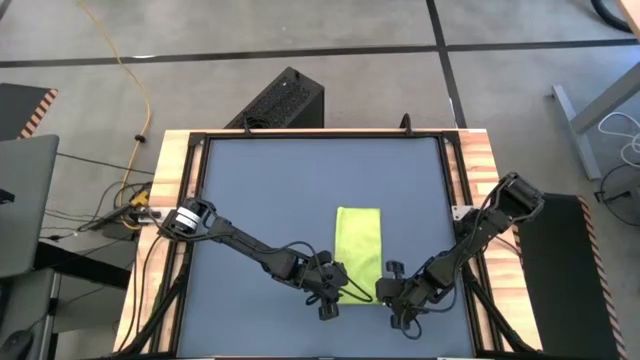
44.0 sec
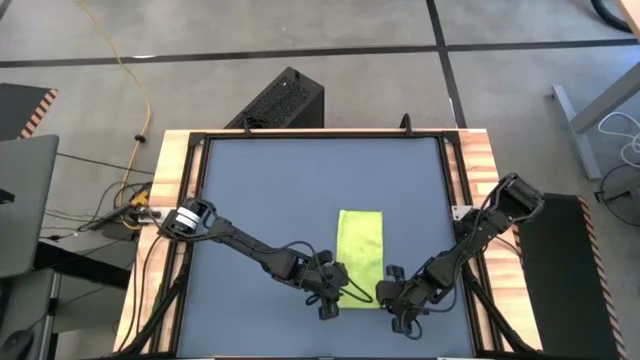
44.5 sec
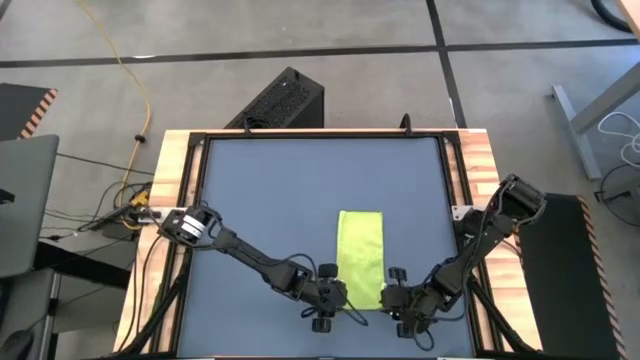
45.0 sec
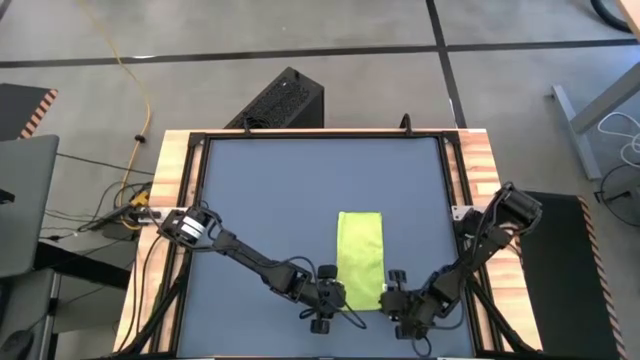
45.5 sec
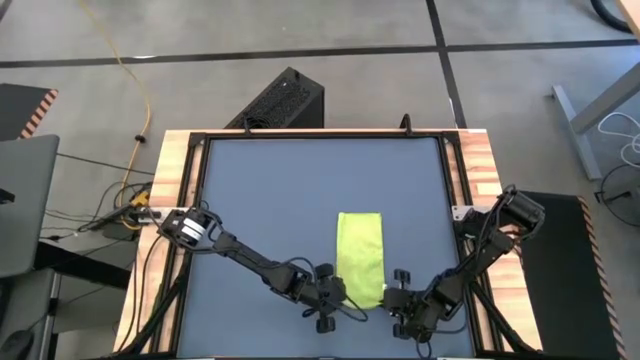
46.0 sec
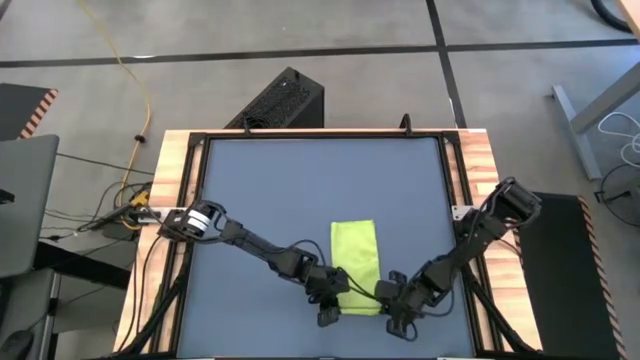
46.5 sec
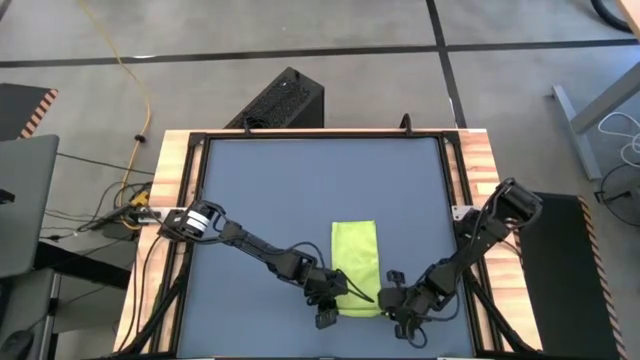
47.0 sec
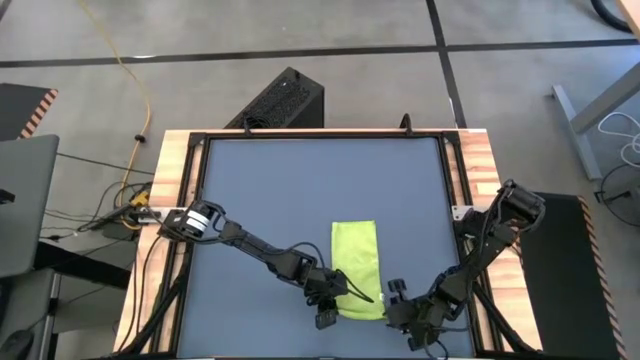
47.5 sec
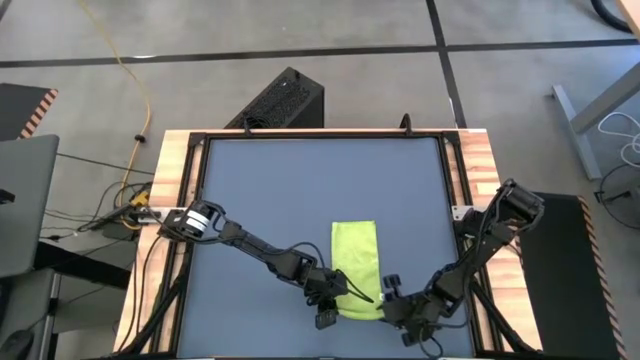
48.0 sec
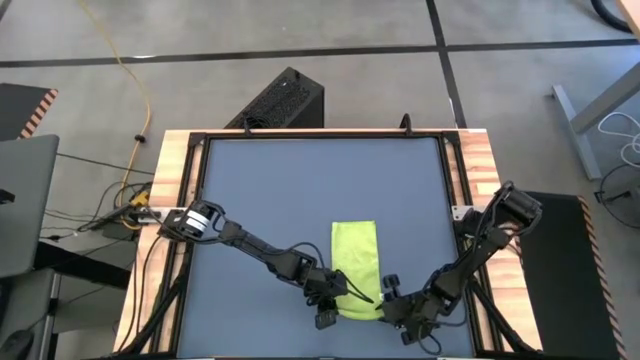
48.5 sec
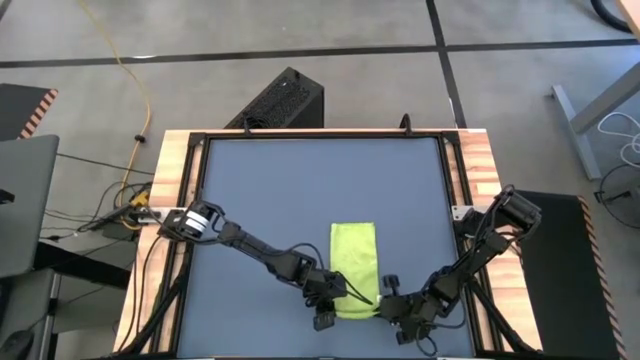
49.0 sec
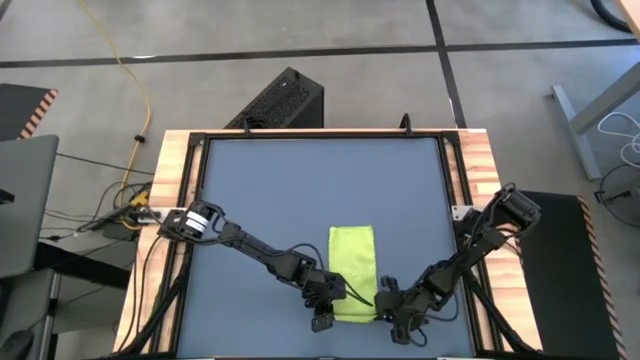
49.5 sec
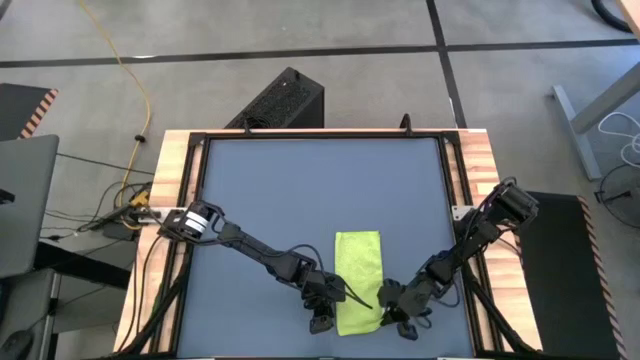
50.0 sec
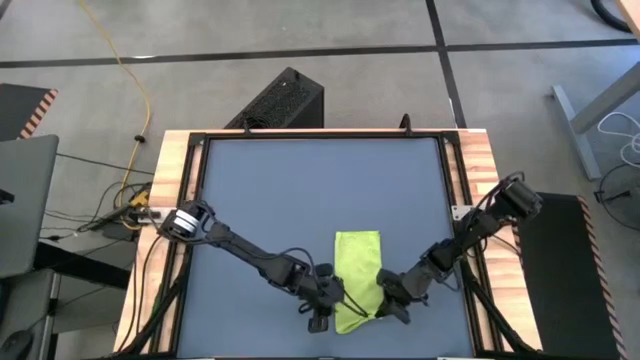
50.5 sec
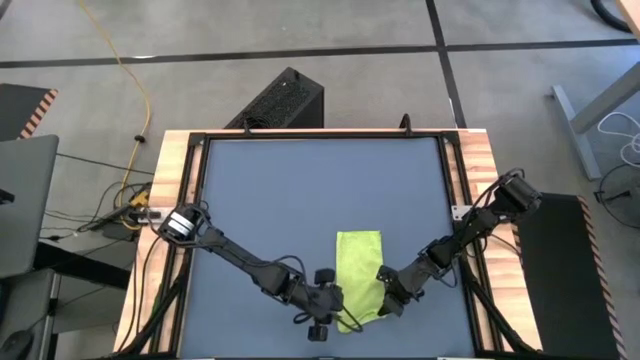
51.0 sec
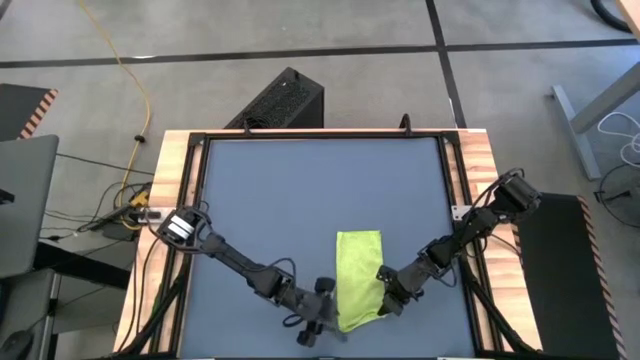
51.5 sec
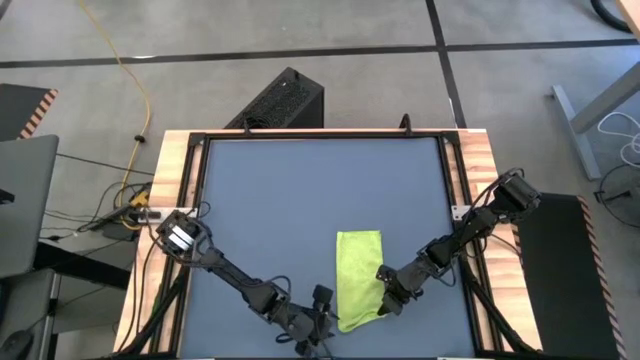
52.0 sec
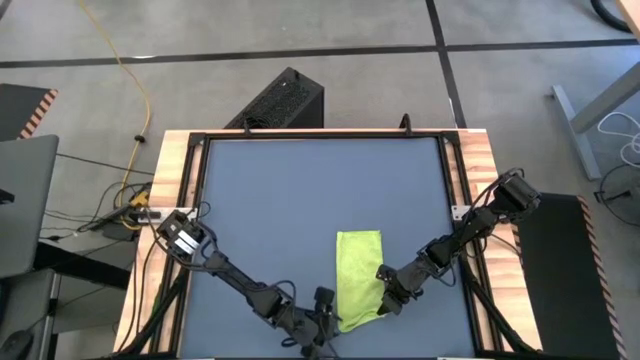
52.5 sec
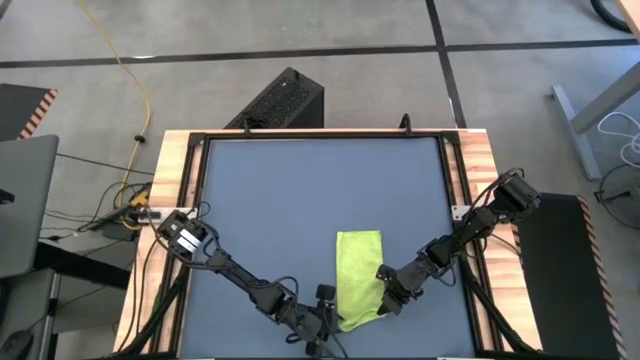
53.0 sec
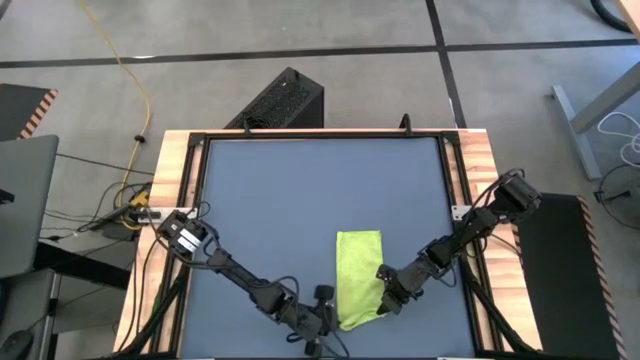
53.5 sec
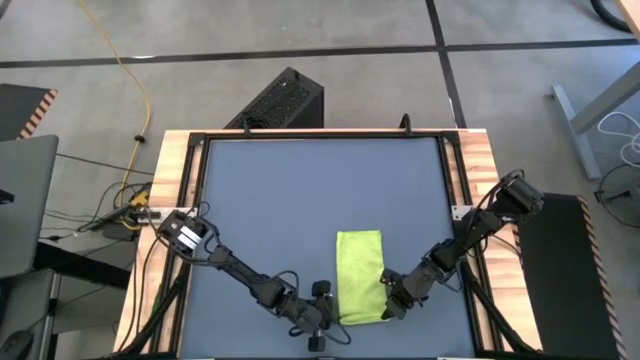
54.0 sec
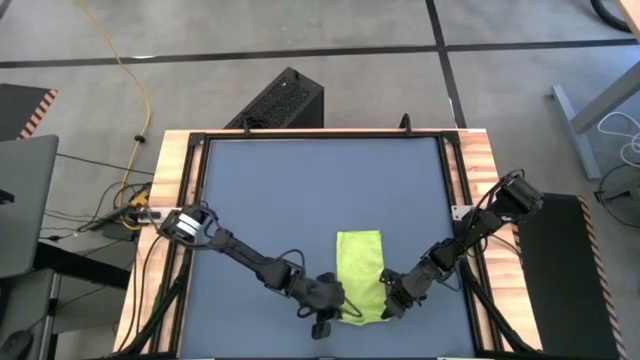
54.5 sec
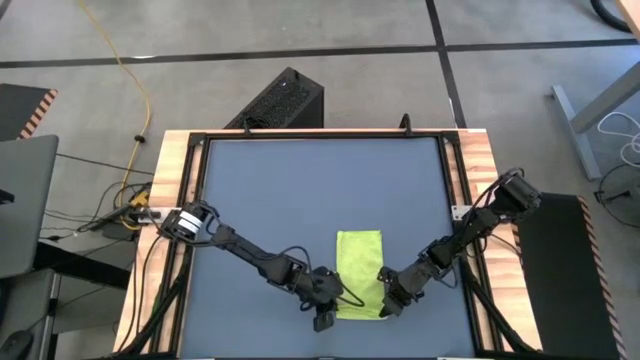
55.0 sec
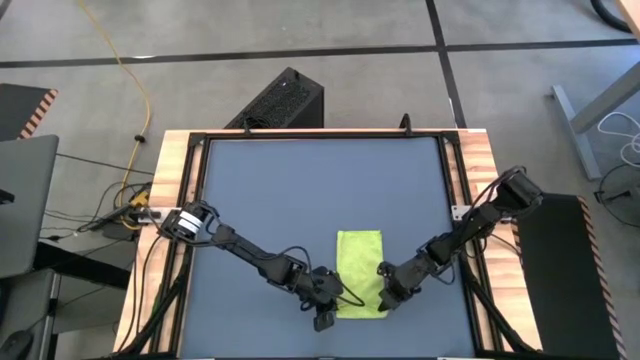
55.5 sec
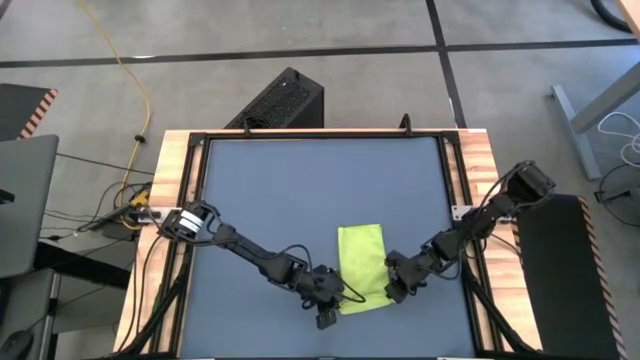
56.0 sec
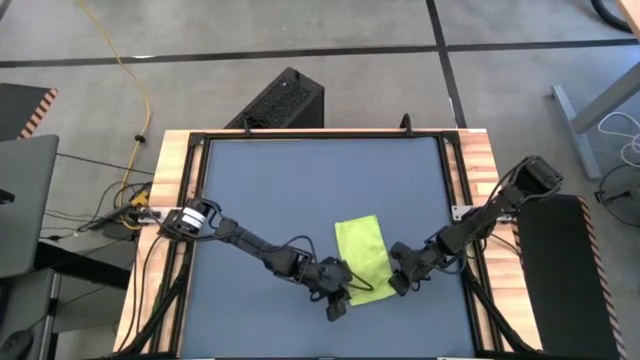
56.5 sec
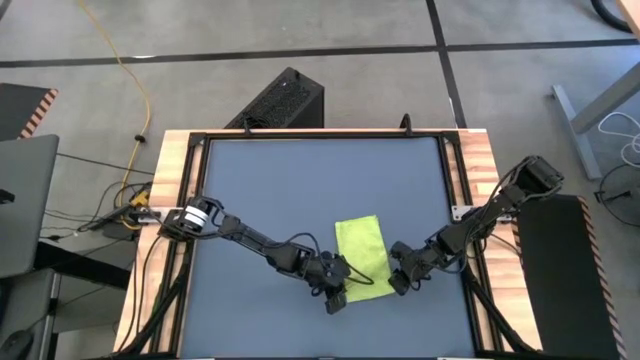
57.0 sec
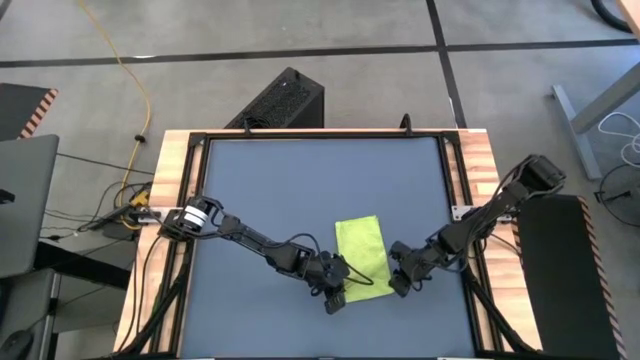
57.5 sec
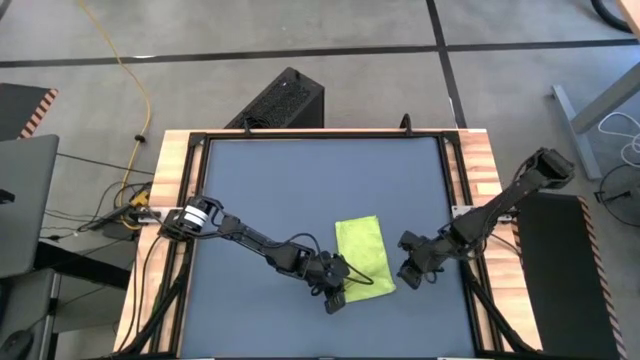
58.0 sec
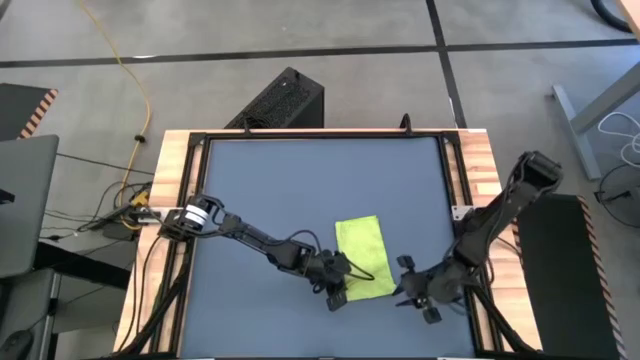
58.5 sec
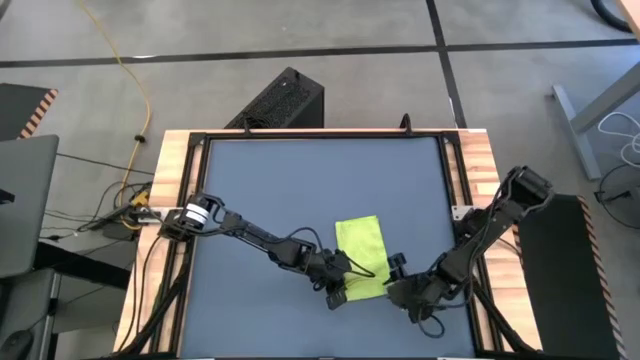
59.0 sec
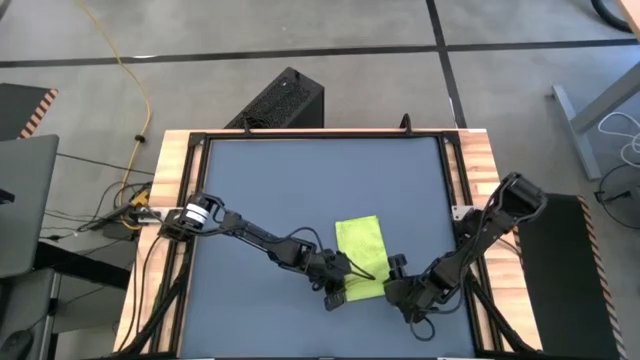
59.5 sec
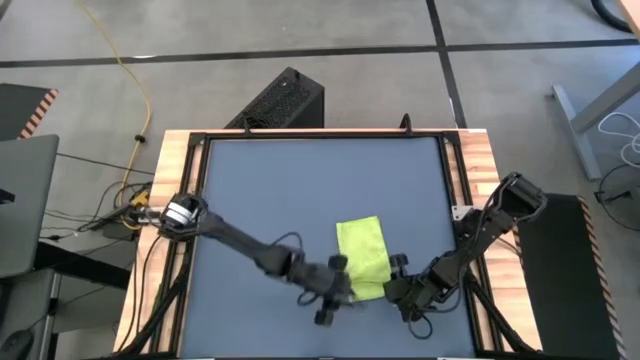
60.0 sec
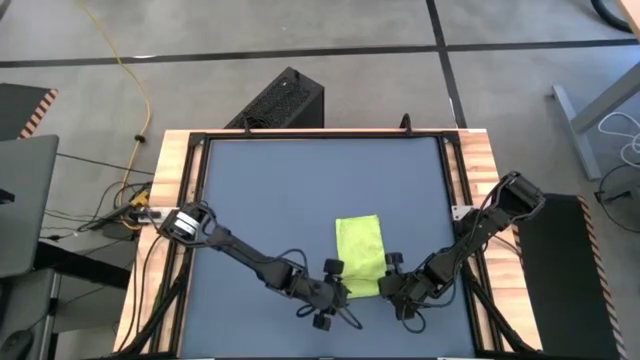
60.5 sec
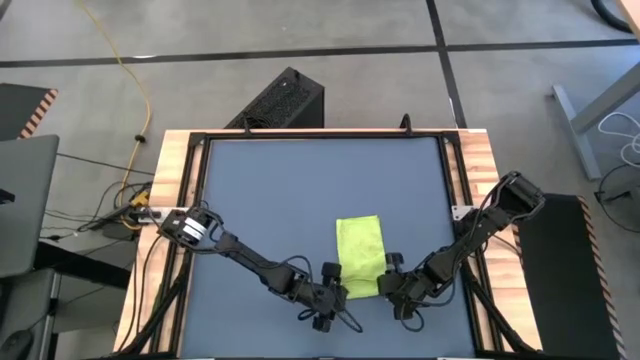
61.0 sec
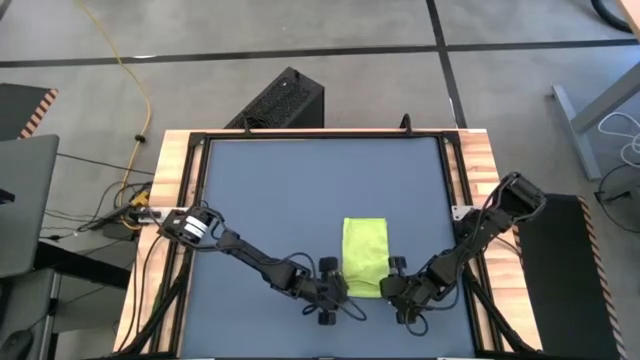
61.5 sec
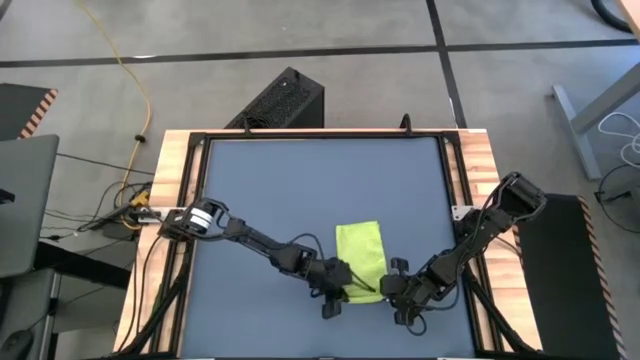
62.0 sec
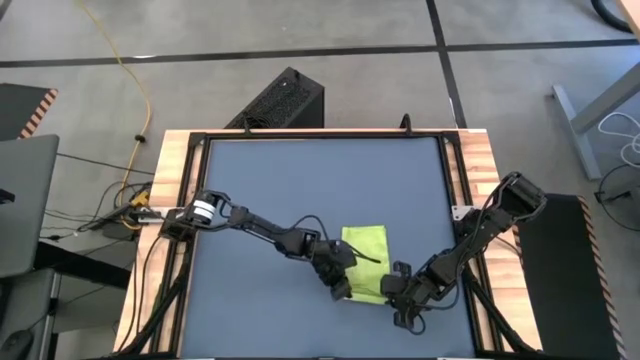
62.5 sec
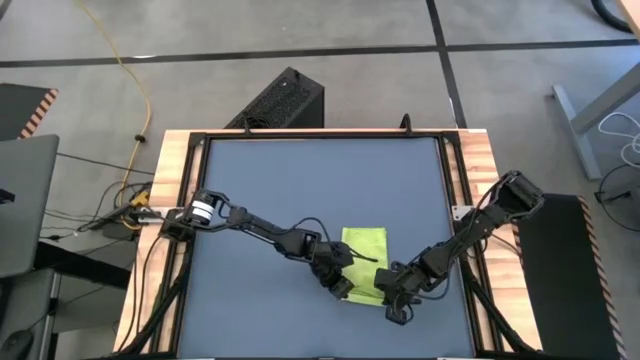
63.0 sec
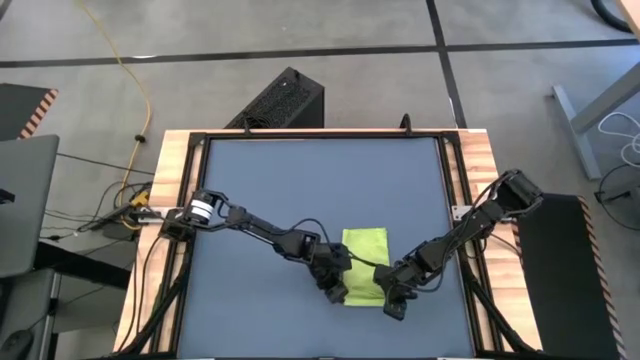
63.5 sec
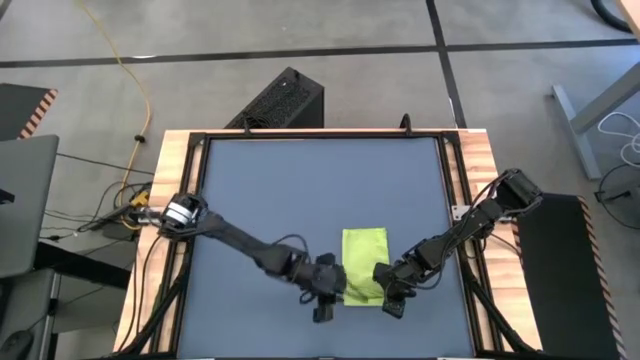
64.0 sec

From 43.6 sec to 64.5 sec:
Task: Roll towel into tight, uniform cylinder
Roll the green towel
